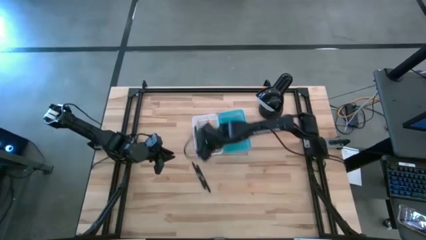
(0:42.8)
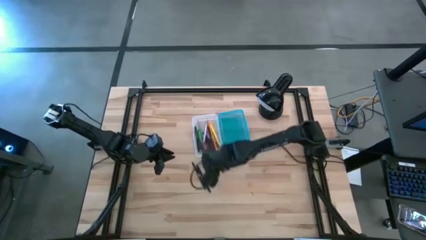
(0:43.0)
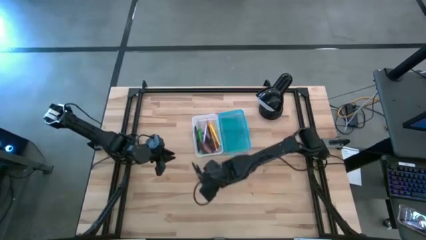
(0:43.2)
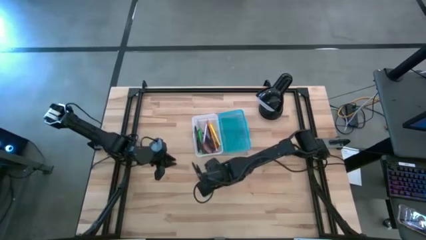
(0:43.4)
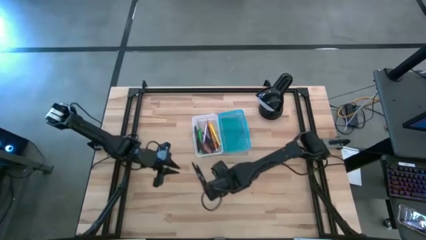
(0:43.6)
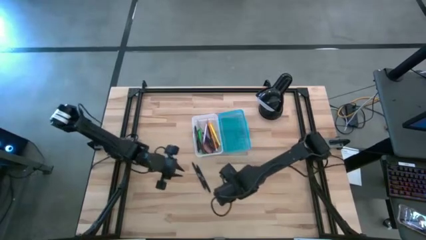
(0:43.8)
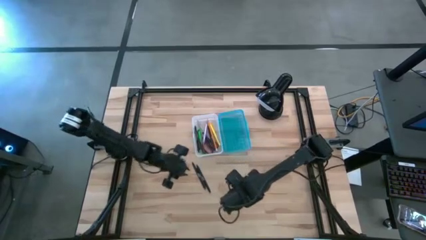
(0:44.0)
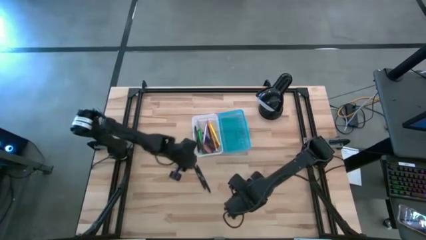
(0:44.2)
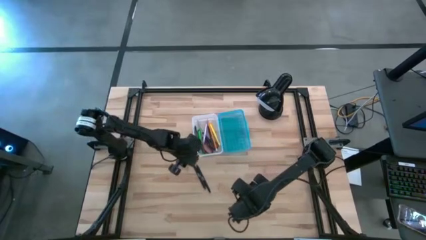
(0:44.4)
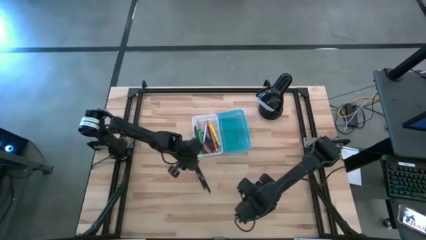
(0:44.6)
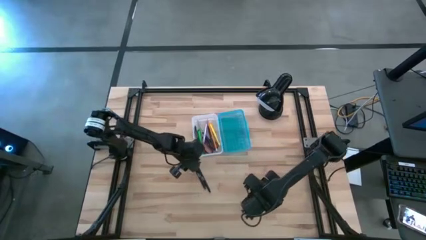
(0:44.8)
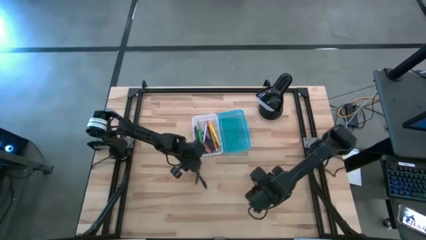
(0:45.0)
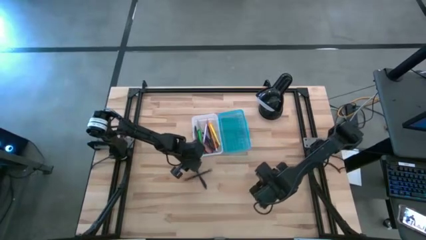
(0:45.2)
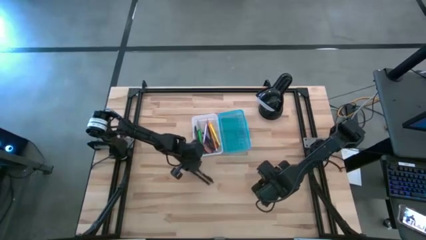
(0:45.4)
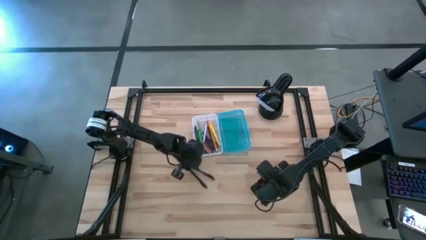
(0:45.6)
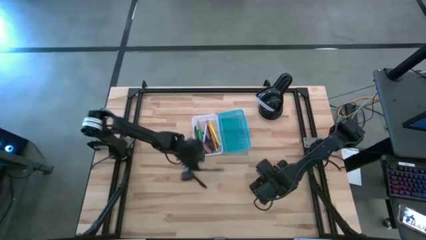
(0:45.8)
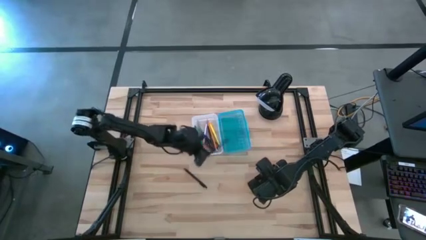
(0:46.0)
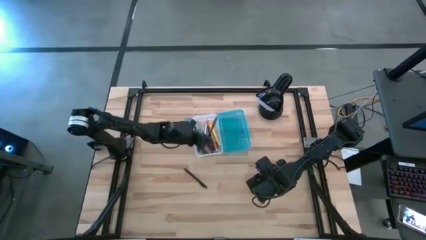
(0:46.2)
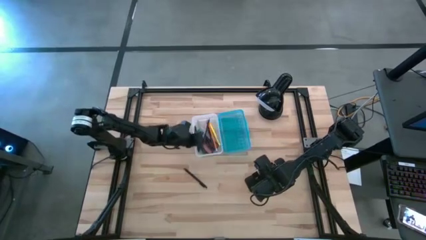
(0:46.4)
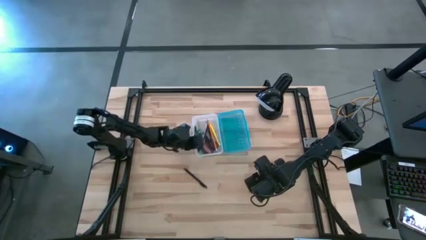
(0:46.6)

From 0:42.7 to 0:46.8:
Task: Pick & place school supplies into a supply box
Put the black pen into the blue supply box

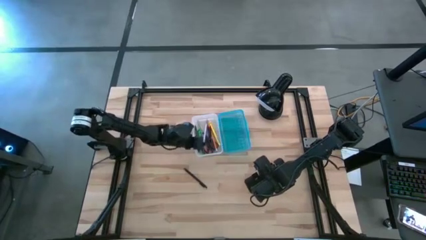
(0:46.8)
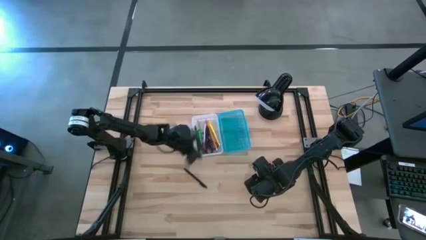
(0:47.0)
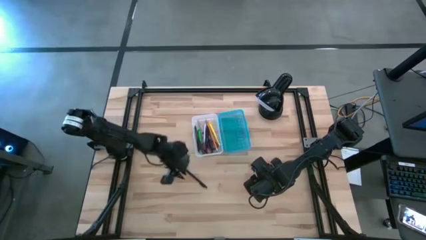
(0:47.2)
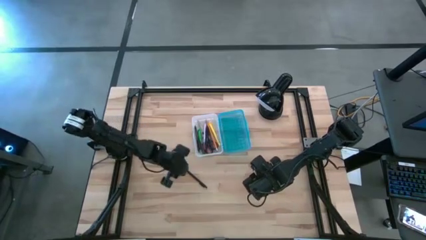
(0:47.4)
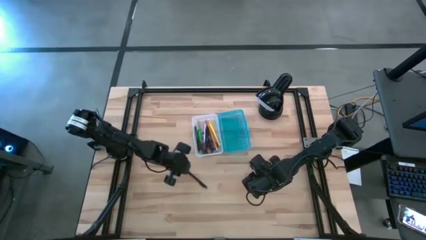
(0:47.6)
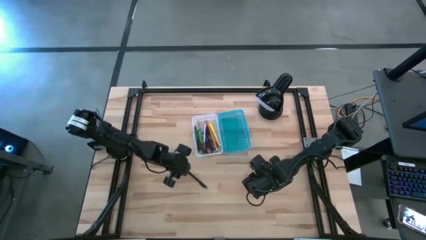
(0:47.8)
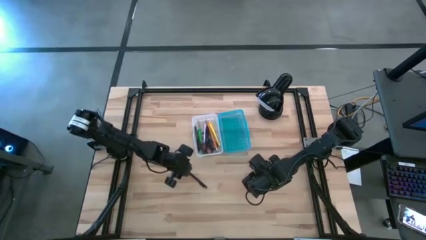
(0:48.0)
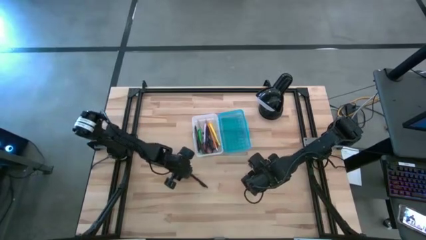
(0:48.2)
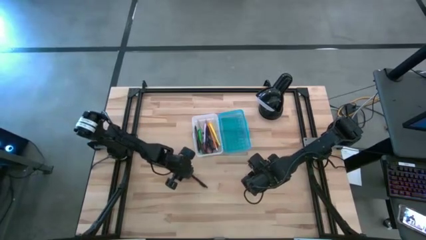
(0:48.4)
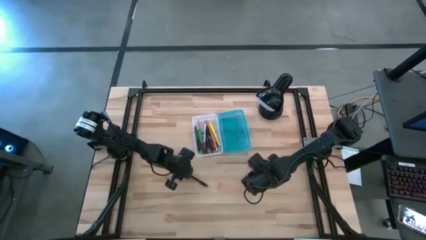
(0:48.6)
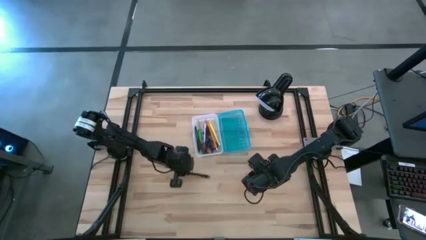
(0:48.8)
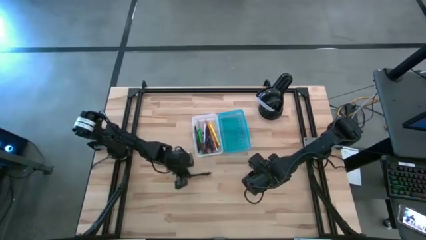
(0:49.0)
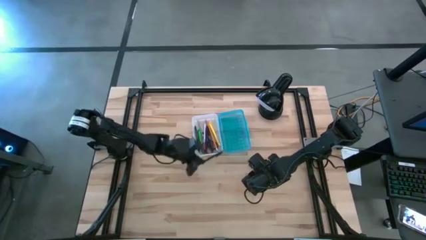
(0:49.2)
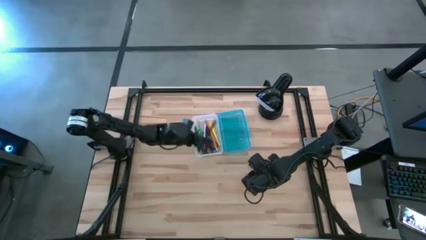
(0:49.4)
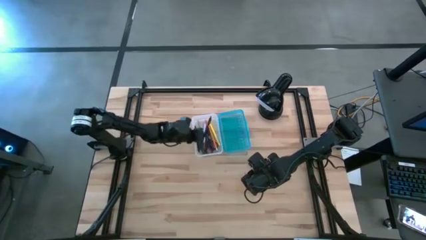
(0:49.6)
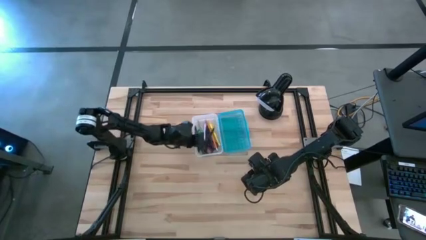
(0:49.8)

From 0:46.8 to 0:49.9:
Put the black pen into the blue supply box

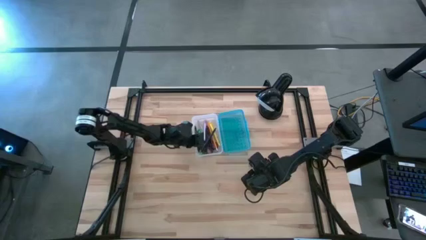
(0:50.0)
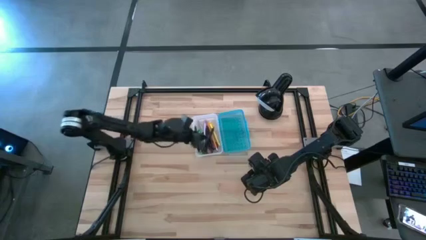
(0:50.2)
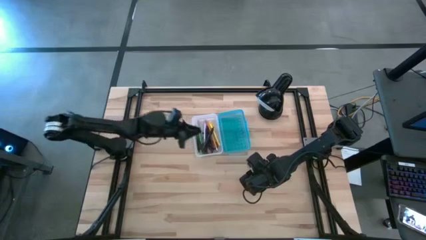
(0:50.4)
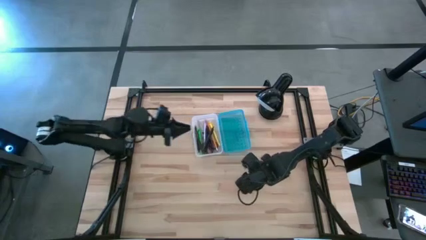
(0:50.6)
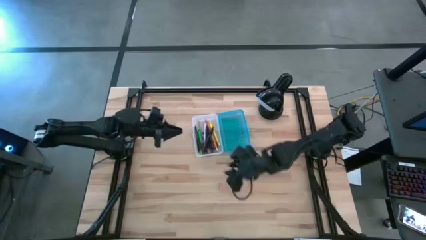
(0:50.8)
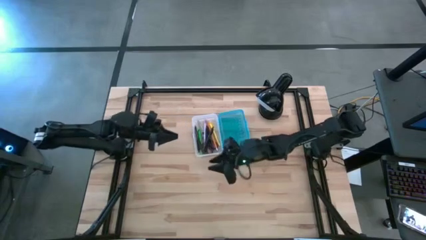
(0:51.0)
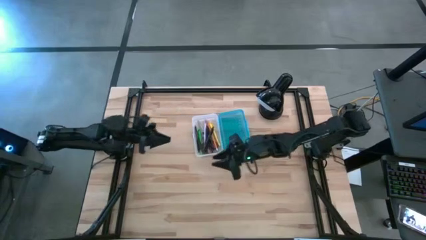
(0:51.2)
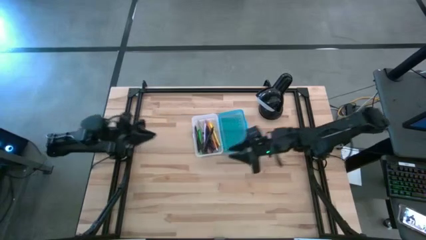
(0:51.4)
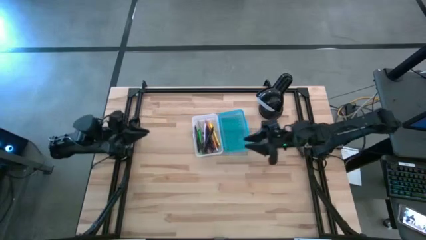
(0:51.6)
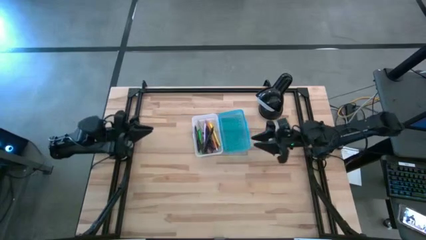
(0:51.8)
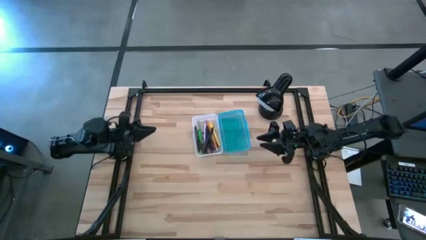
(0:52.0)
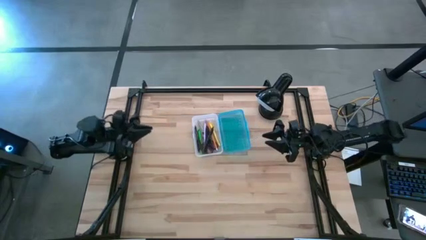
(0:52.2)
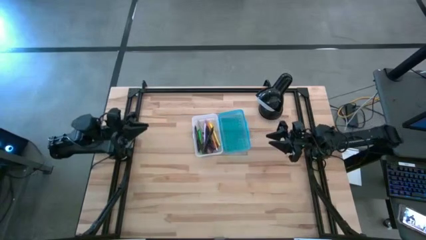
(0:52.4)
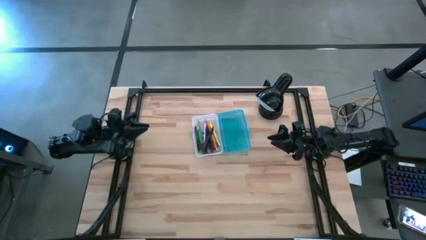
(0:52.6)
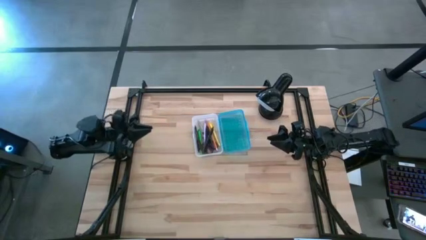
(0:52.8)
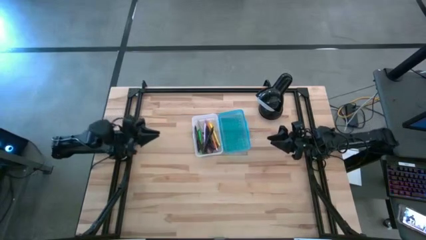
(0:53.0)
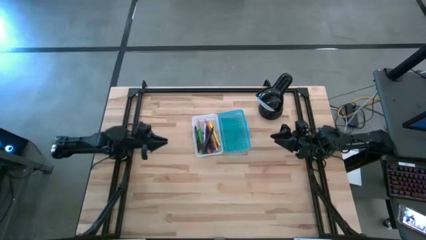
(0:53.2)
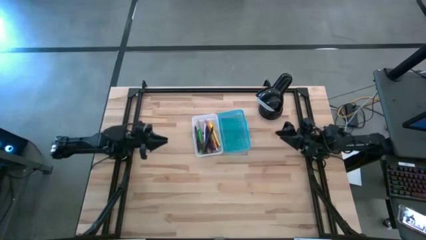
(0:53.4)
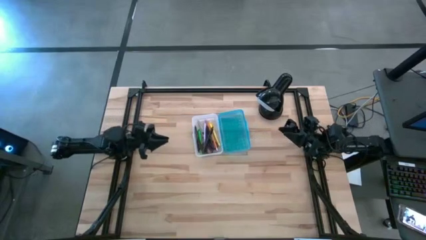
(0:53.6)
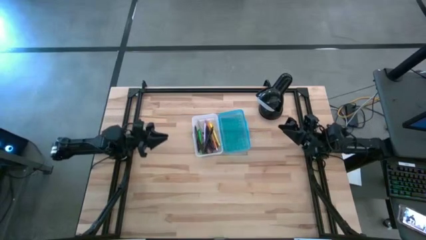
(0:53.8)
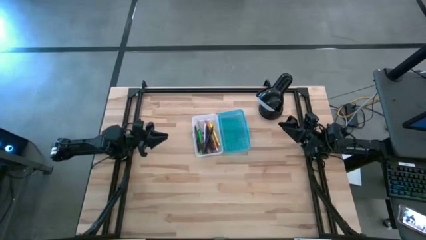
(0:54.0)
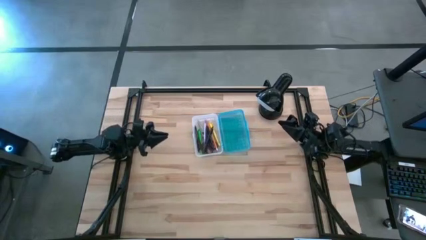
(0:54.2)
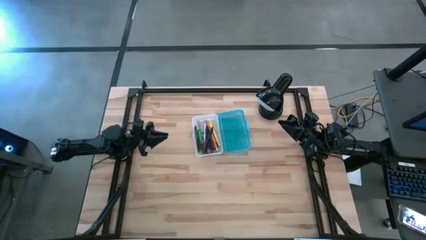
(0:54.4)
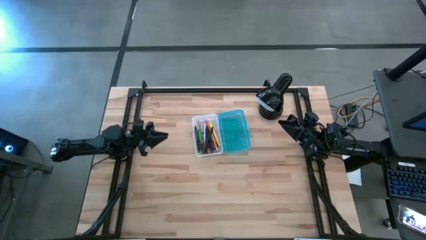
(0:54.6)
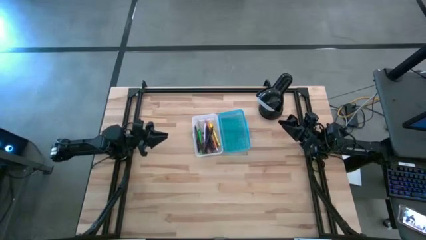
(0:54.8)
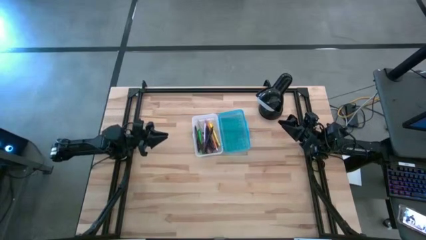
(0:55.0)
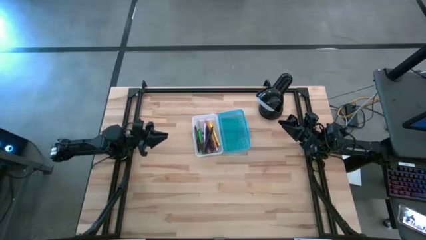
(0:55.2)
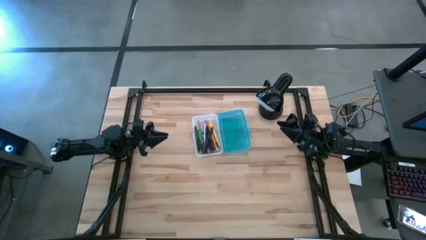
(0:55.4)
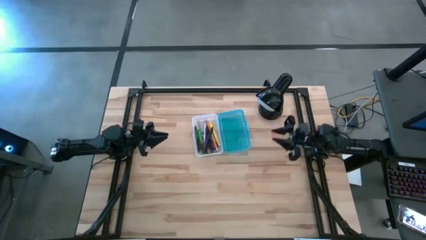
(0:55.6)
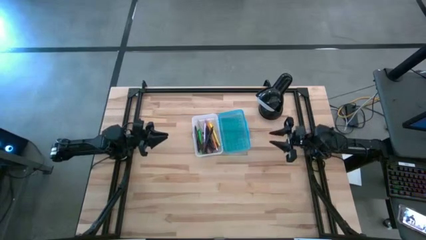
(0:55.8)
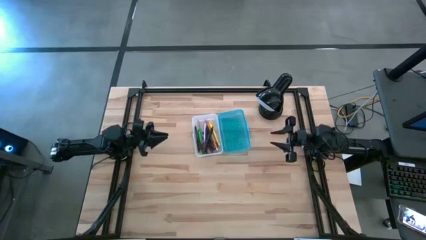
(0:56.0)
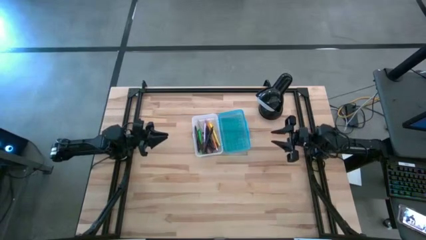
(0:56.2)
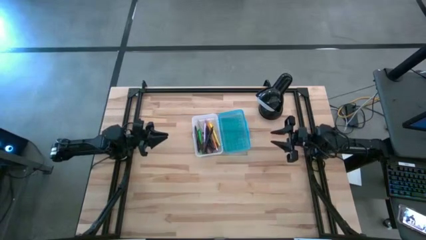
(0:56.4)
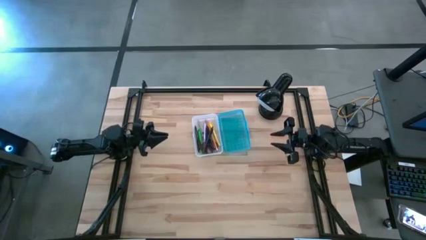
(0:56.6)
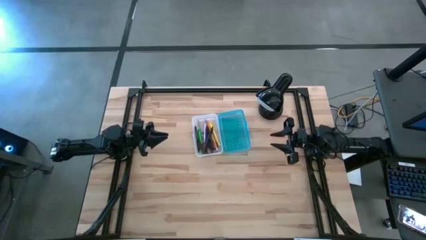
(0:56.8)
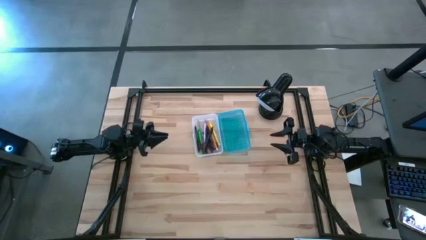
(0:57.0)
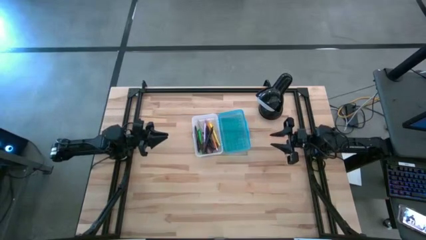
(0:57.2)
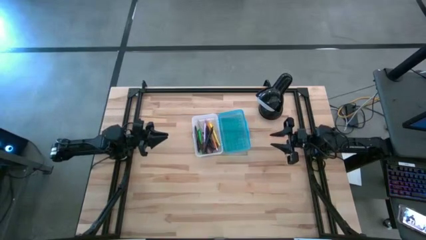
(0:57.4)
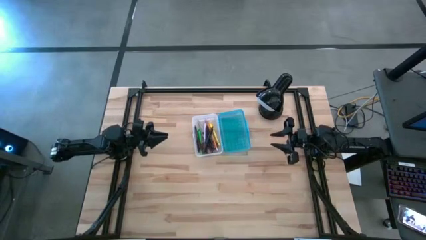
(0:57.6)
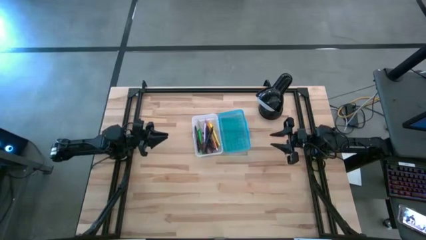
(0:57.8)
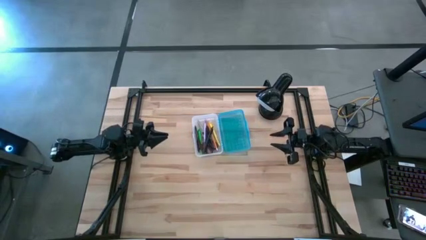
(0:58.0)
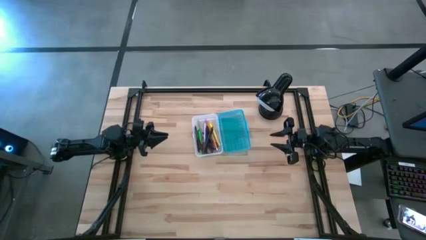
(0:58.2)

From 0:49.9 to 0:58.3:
Return to Home Position

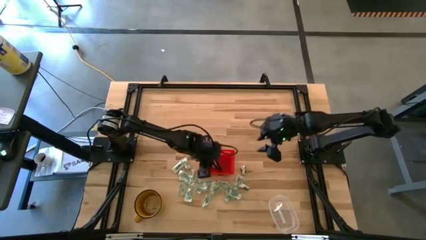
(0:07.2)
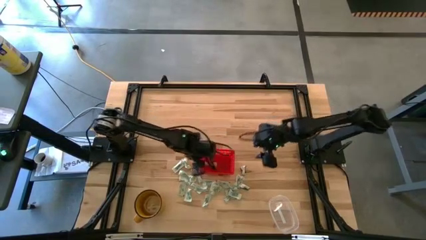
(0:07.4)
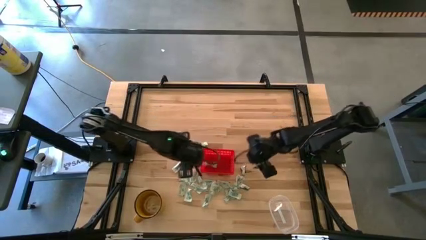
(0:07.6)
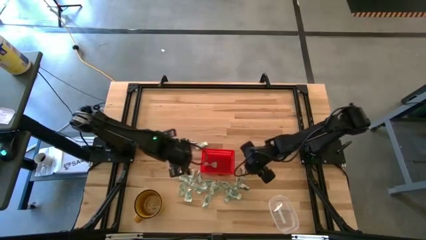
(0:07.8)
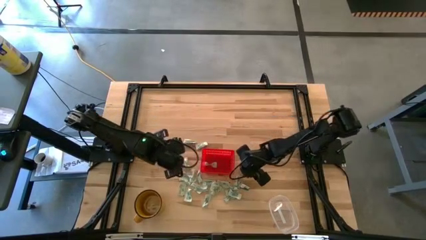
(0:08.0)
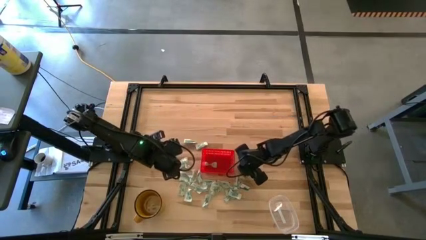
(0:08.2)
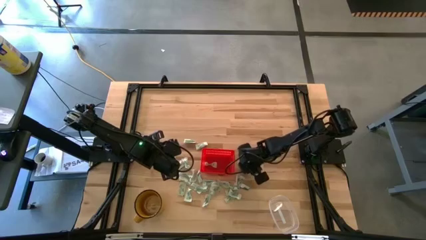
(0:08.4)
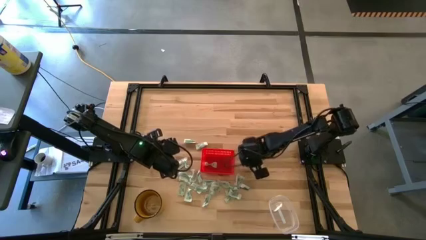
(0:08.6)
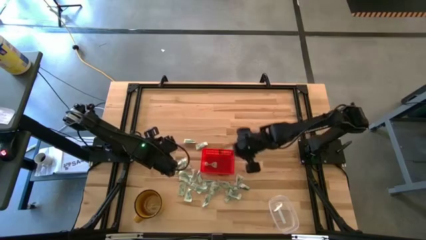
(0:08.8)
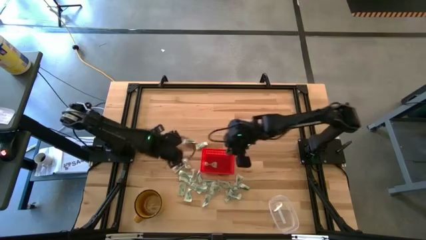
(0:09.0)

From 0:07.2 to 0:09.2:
Task: Pick and place Stevia / Truvia into bins
Put the stevia packet into the orange basket
